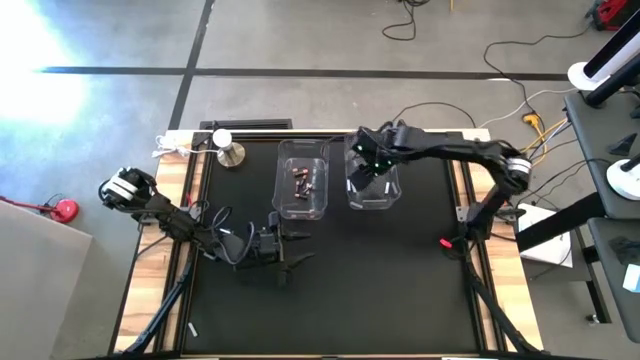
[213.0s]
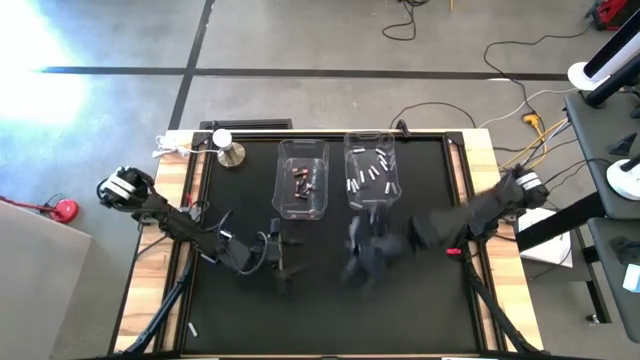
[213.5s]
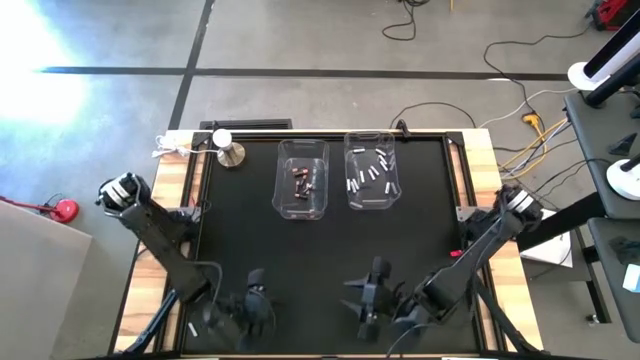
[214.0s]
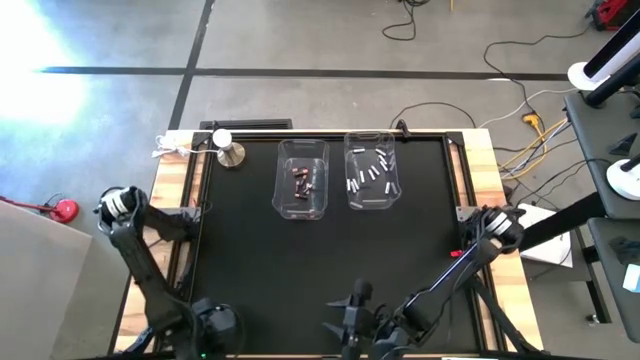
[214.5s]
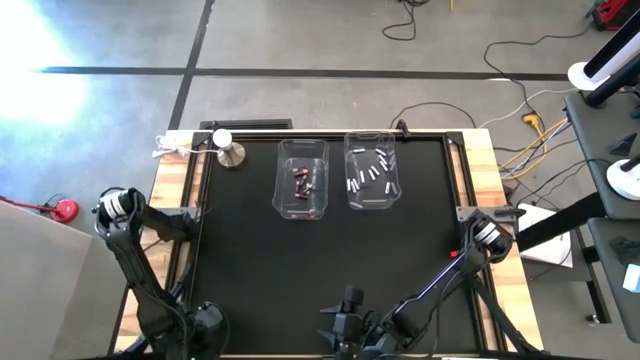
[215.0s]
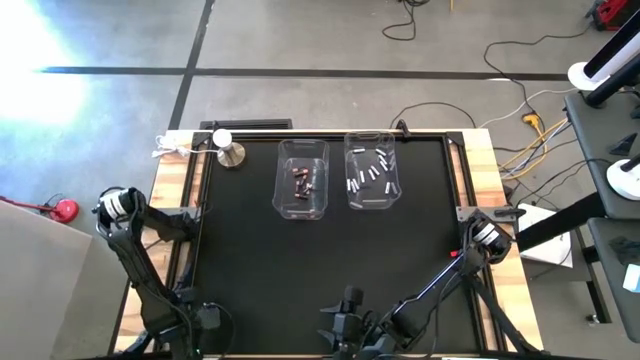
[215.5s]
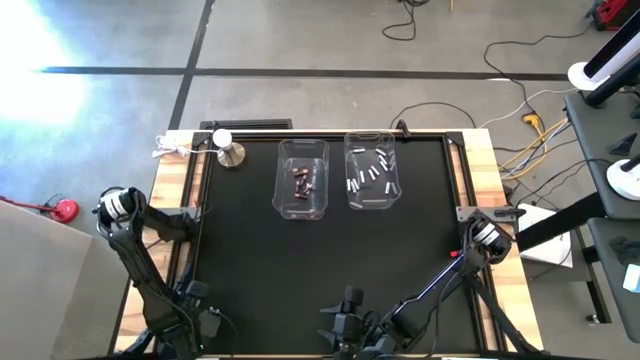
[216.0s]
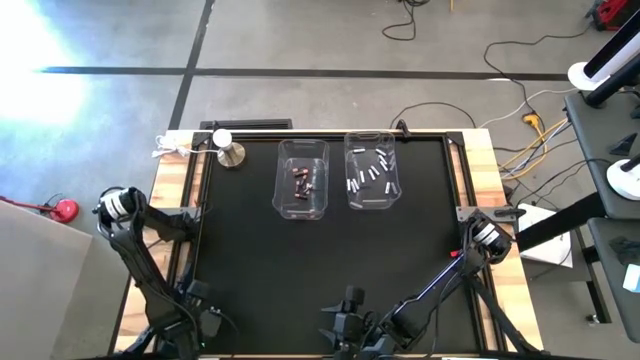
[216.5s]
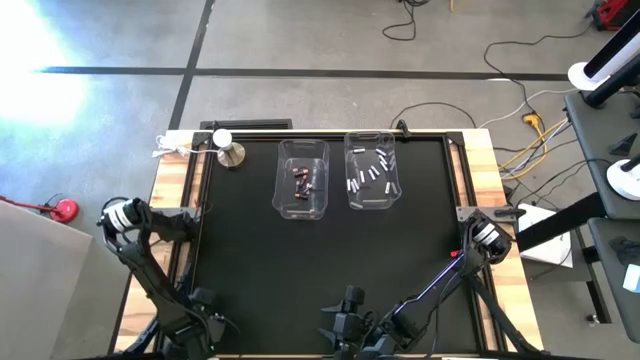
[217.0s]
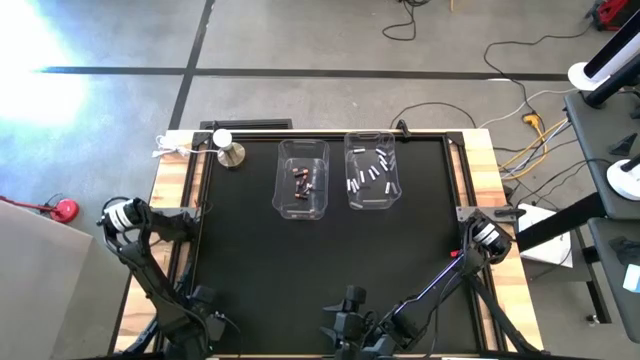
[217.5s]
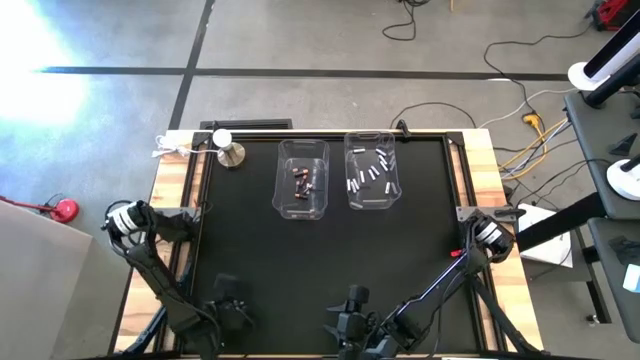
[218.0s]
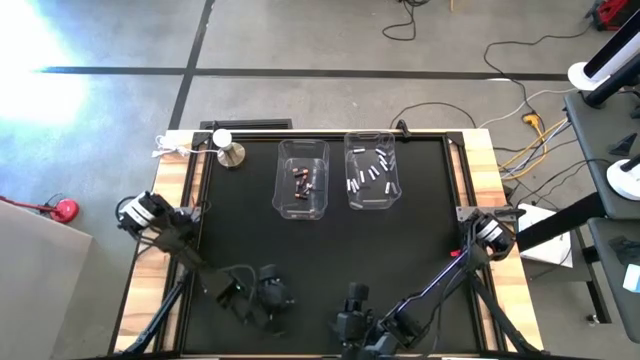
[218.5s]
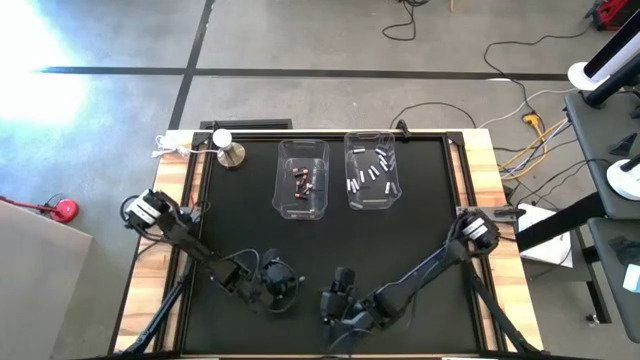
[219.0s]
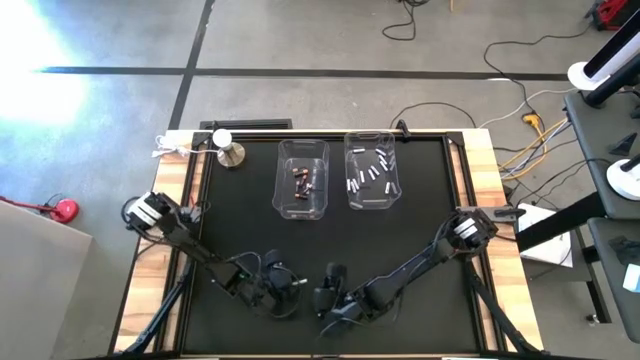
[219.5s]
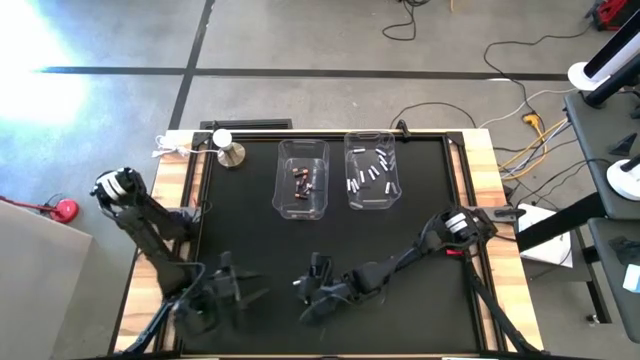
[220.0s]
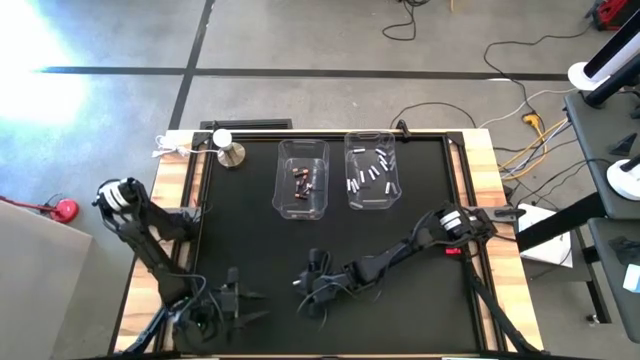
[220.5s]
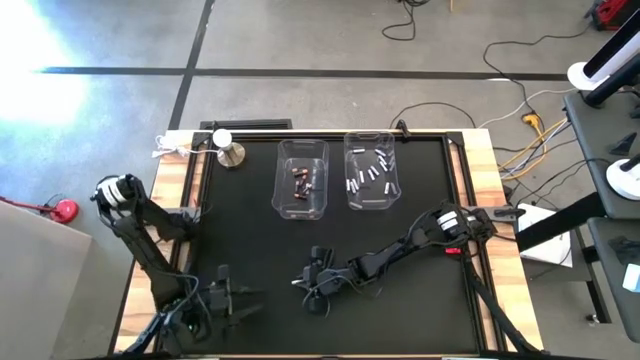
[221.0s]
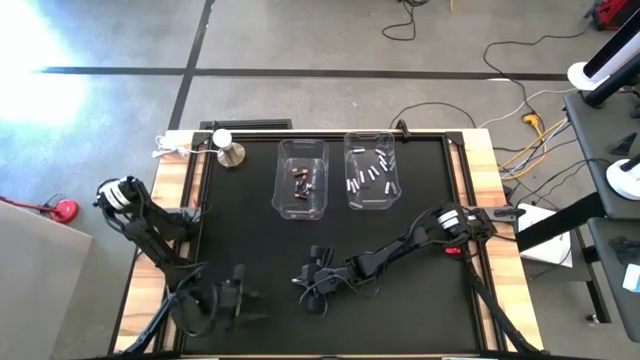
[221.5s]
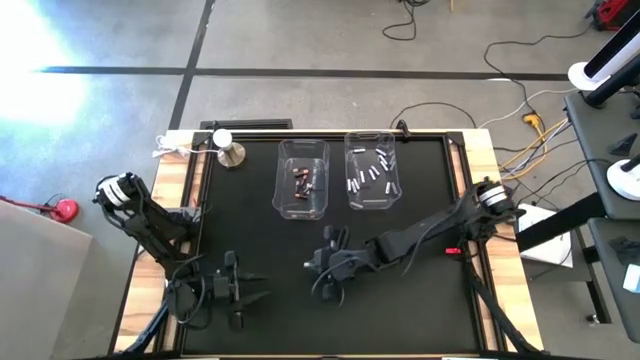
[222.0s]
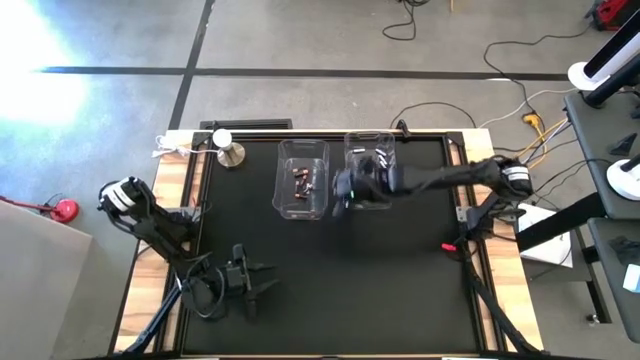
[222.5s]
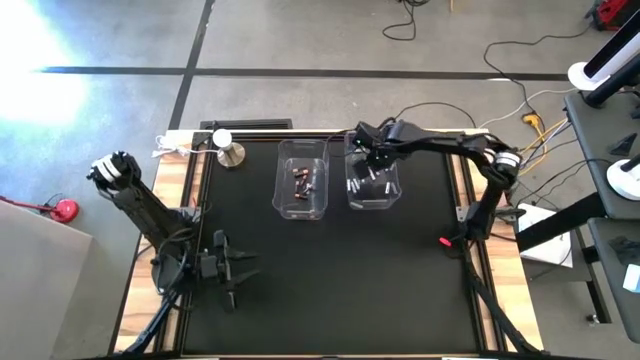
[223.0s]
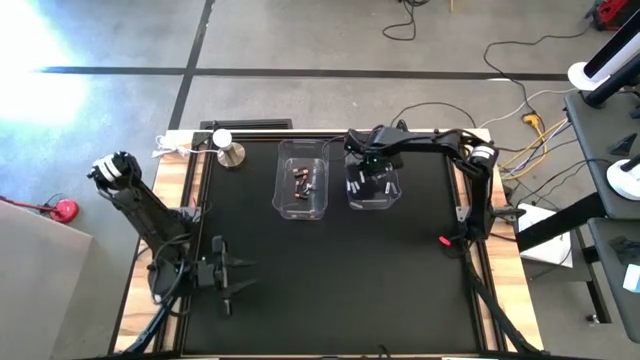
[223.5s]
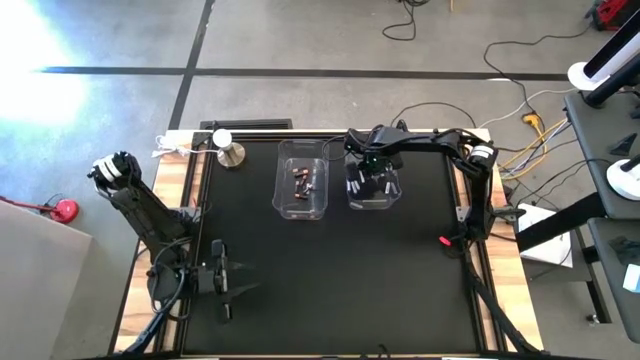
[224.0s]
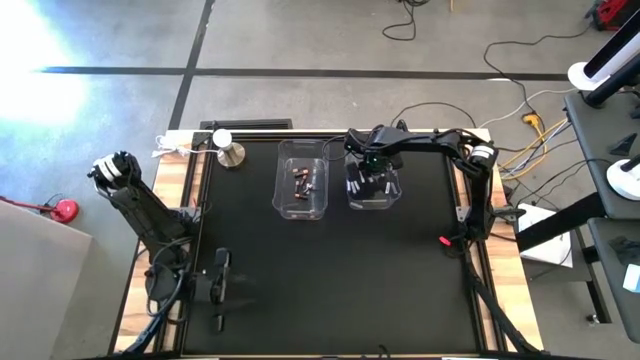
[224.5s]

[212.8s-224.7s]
Task: Sort batteries
Put the white battery into the right transparent bin

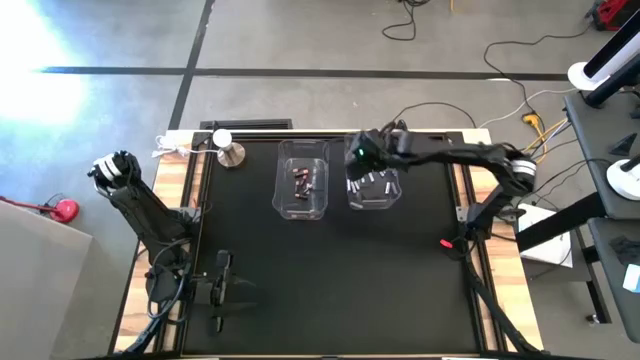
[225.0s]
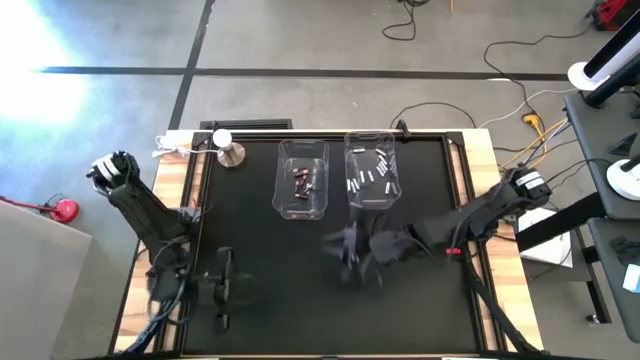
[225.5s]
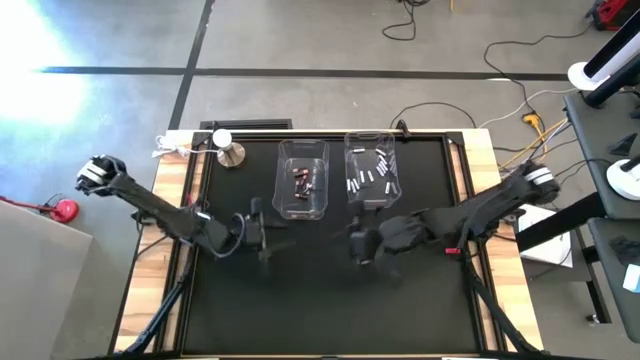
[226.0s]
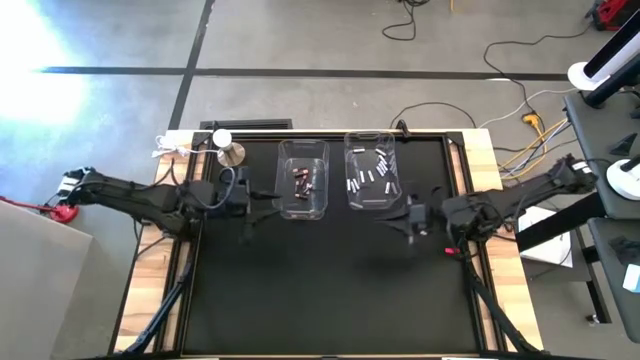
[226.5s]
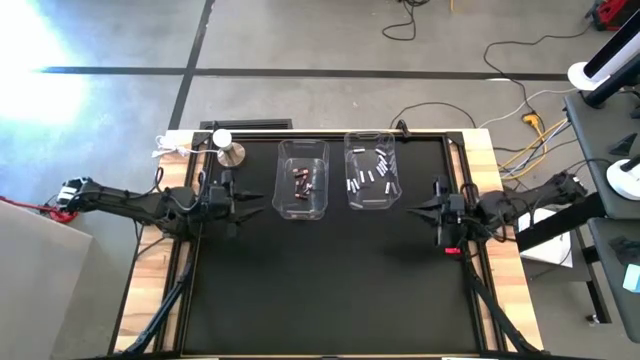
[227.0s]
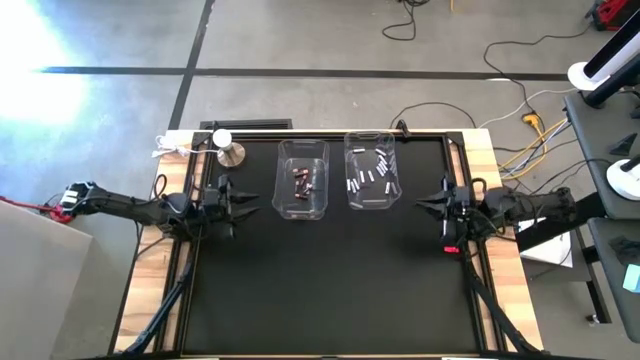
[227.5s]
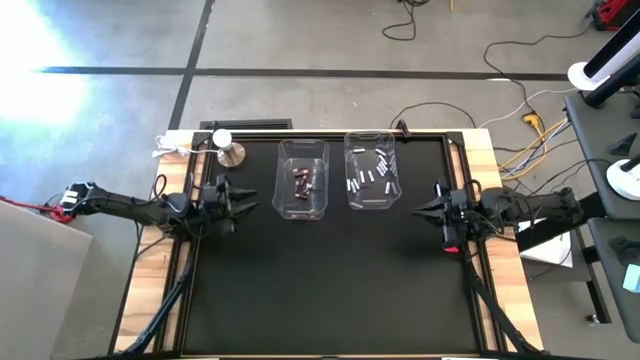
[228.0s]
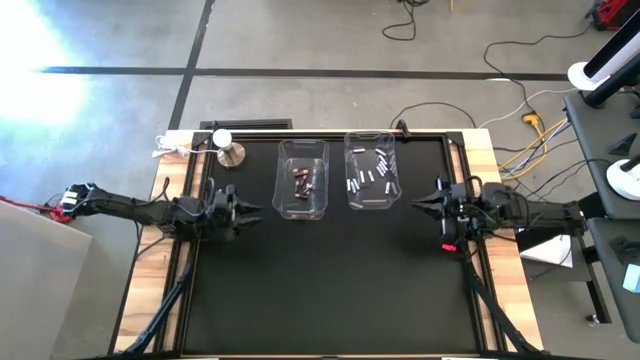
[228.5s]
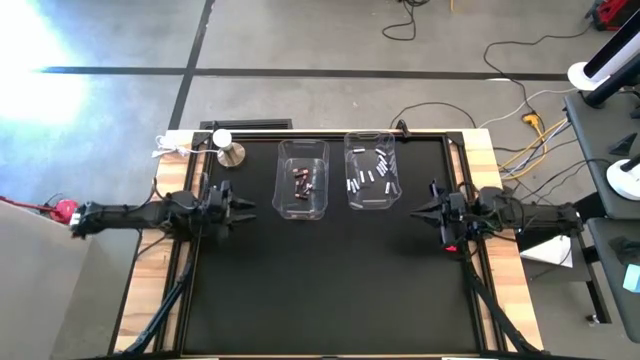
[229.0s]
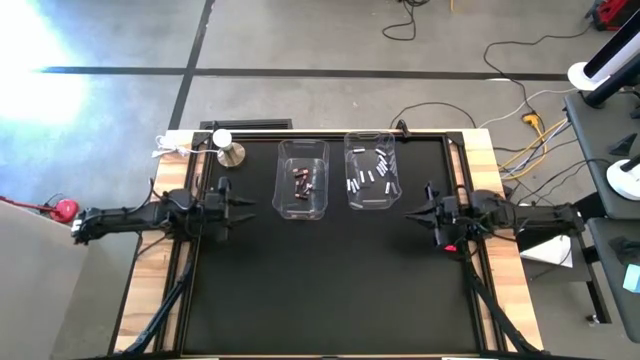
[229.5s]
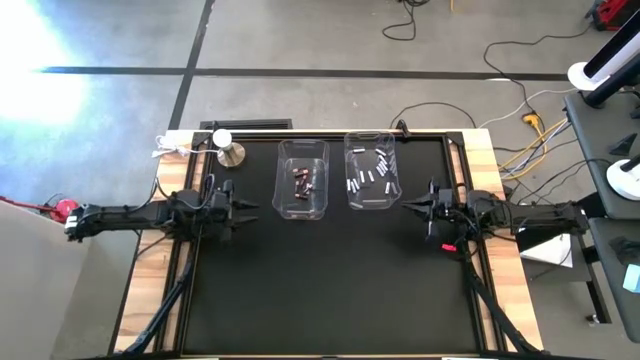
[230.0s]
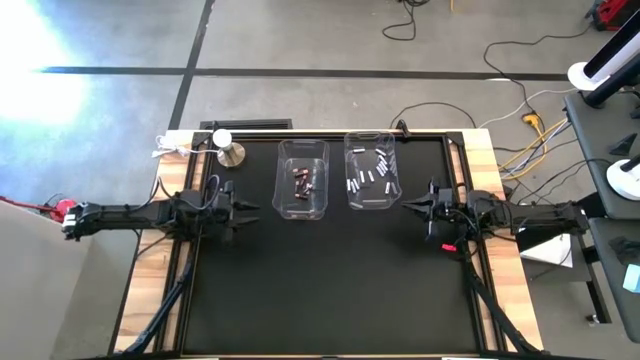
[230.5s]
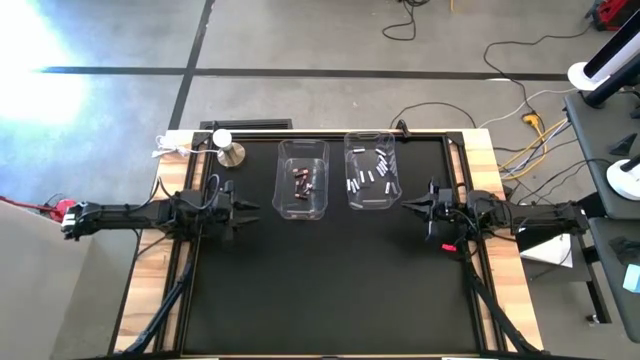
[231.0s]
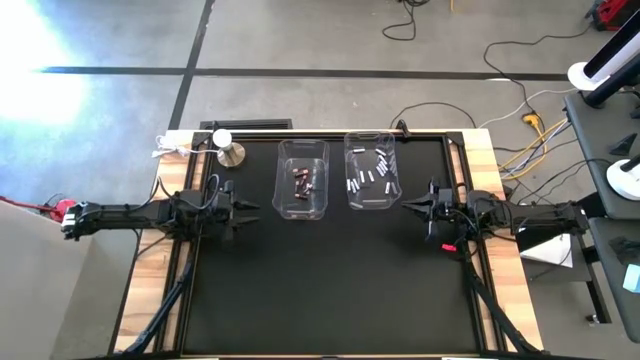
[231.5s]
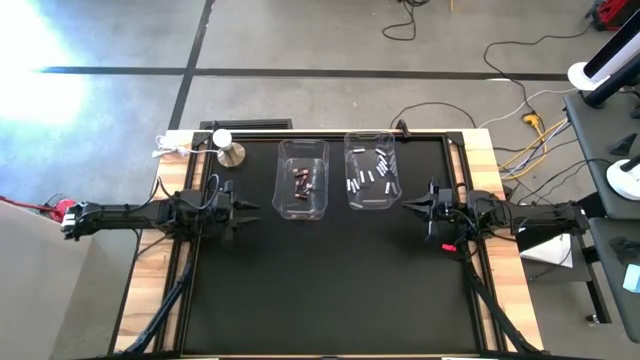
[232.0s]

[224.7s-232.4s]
Return to Home Position

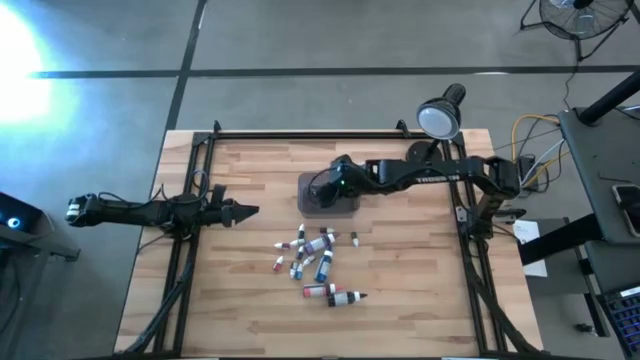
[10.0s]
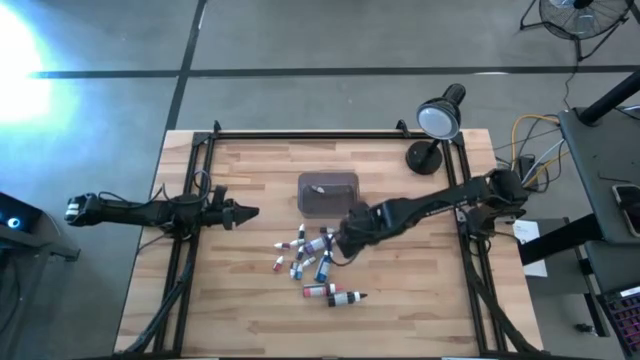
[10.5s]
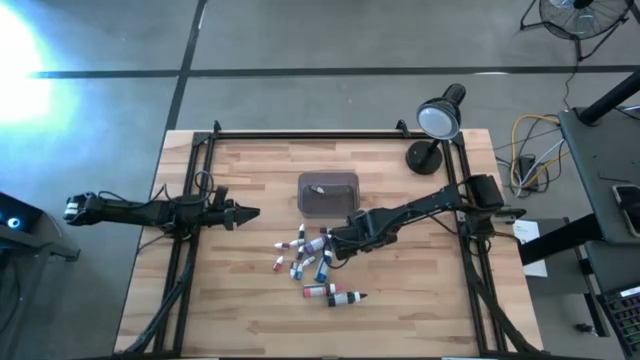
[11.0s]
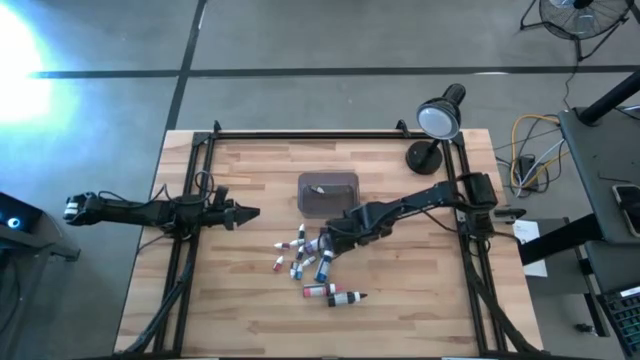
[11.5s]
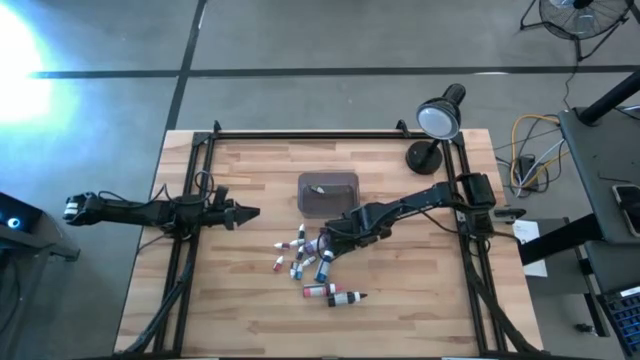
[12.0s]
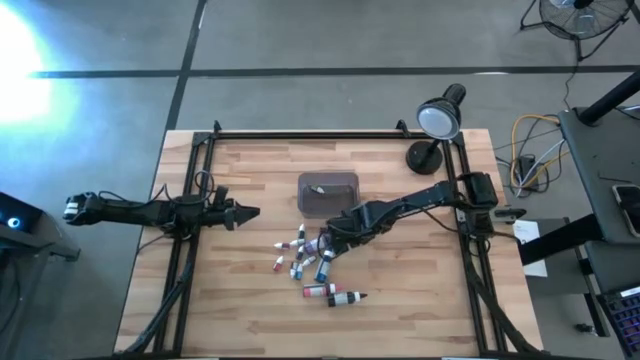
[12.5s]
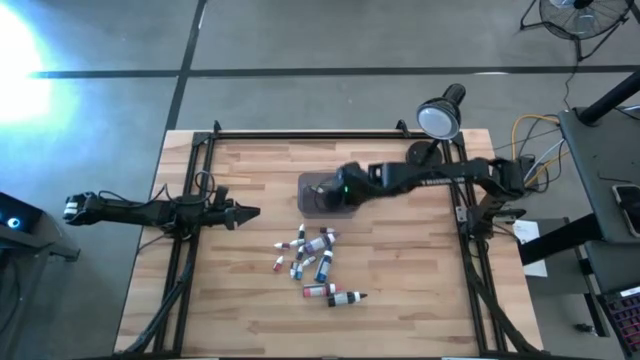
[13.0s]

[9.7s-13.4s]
Task: Pick & Place food coloring
Put the small dark green food coloring bottle into the bin
